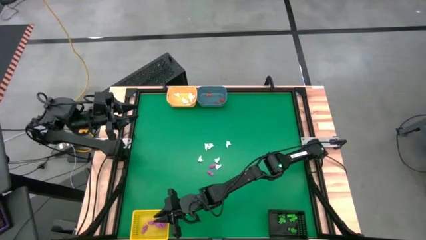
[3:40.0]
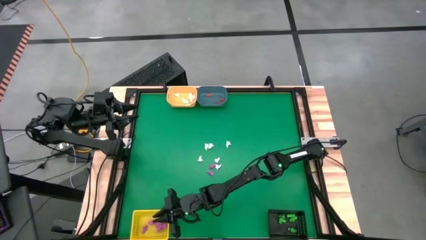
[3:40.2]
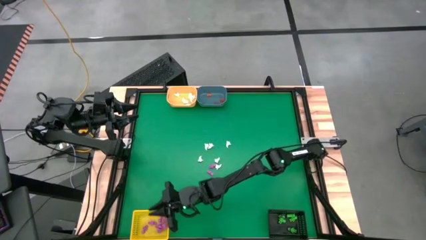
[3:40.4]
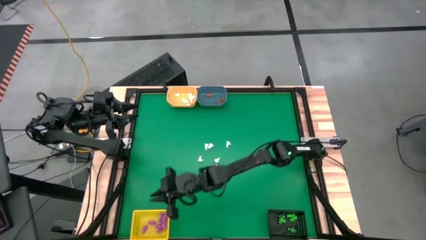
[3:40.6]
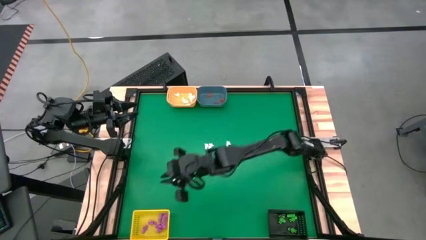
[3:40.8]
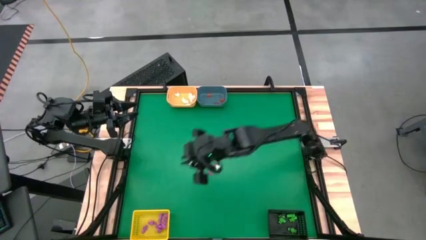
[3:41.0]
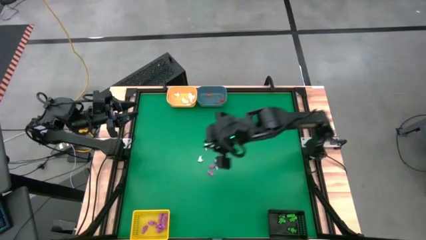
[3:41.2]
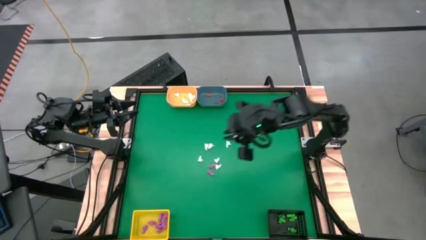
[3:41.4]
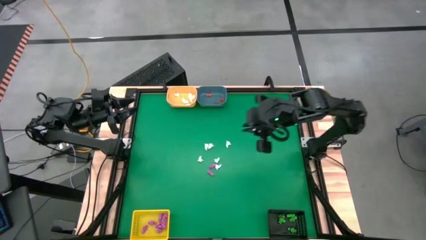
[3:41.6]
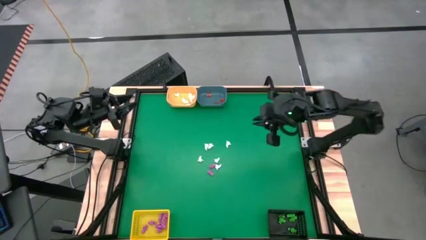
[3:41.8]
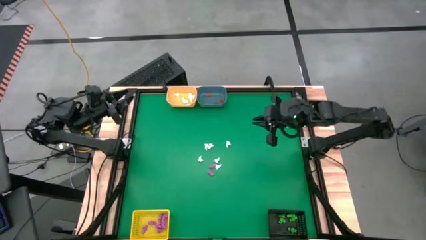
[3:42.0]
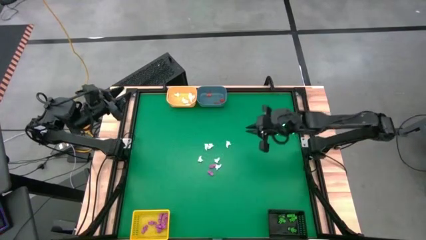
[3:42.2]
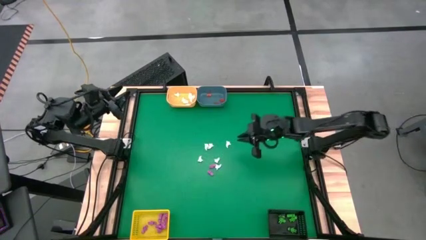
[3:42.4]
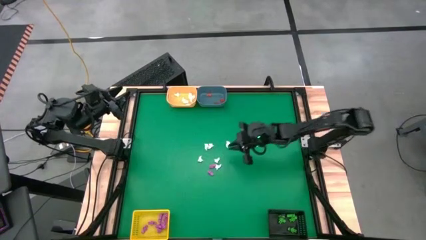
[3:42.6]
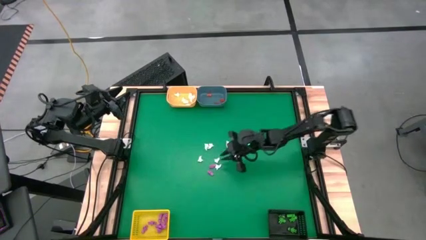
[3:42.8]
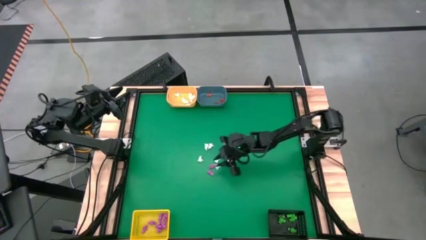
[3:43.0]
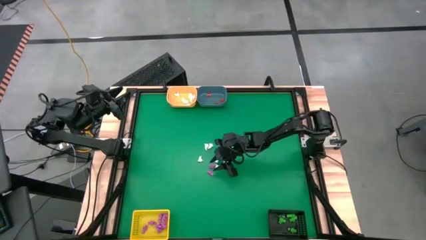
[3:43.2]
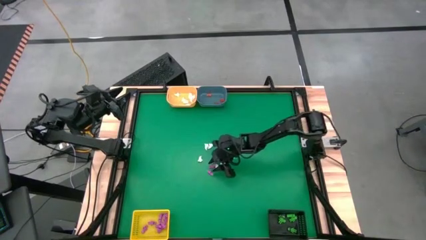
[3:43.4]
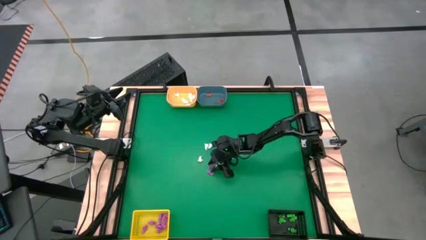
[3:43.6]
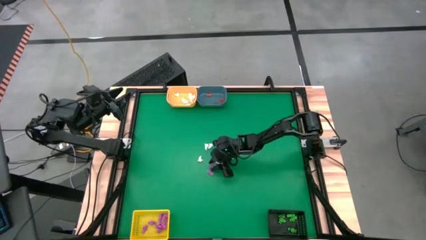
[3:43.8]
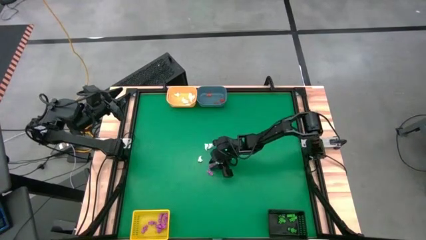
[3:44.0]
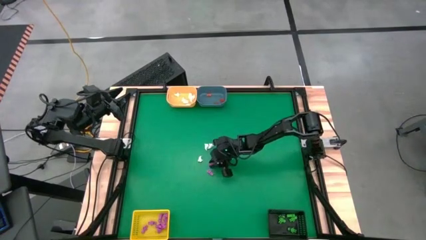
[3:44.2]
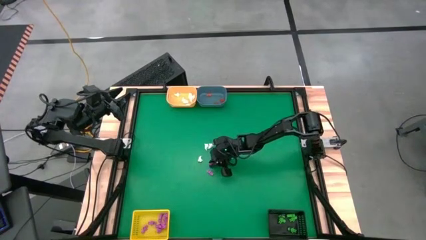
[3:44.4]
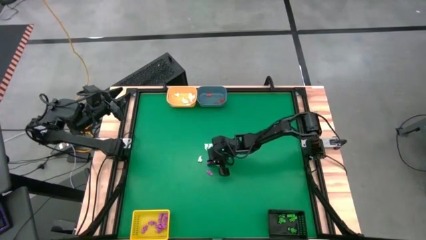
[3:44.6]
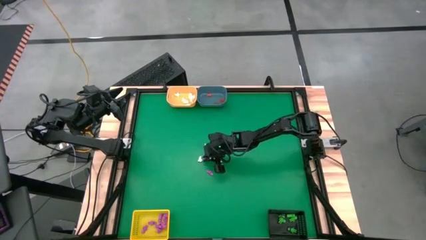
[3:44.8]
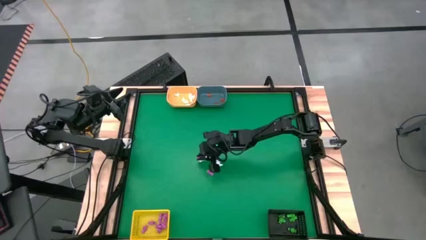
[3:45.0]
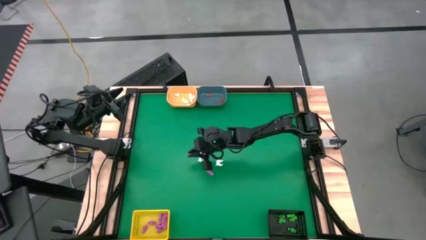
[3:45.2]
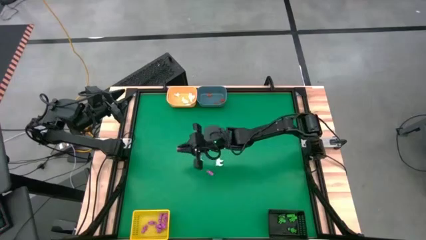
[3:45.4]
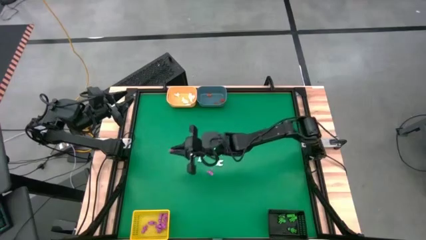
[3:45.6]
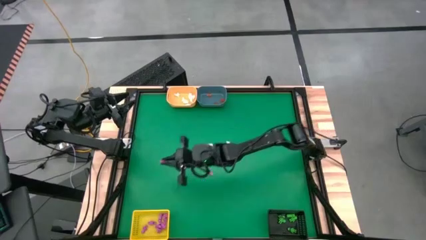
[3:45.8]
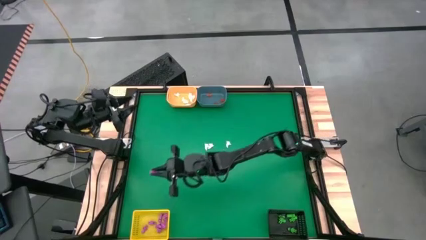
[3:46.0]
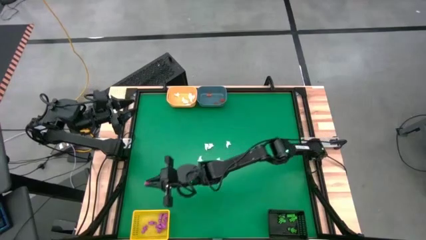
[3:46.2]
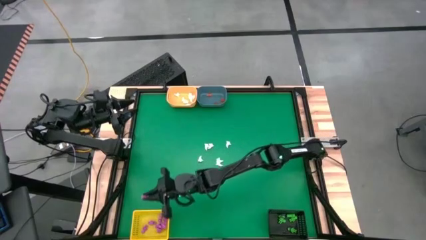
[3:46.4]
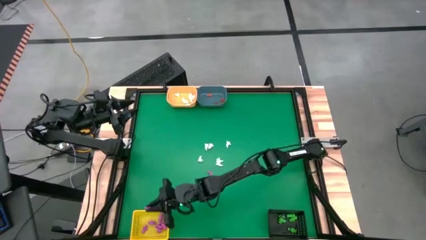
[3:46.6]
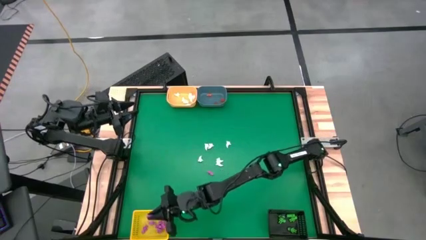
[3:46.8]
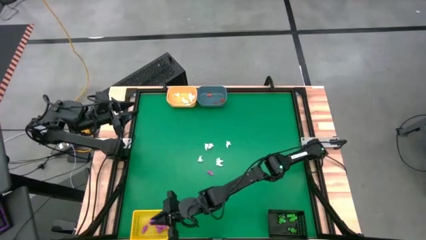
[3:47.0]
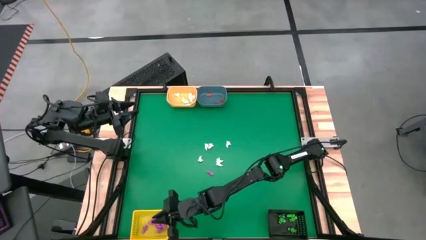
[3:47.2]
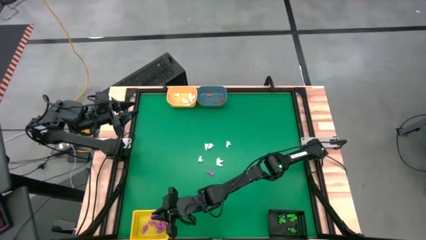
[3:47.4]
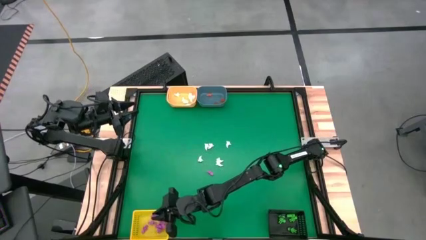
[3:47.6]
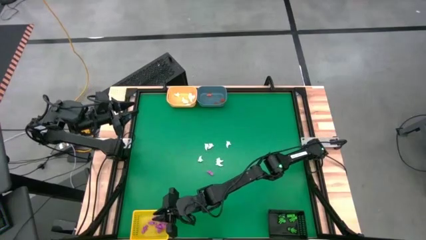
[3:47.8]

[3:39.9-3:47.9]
Task: Sort Halloween decoration
Put the pink skeleton into the yellow bin

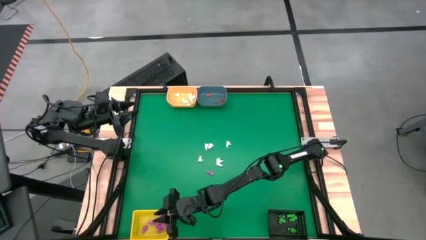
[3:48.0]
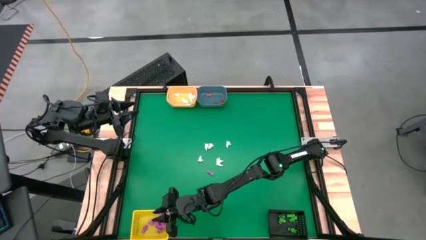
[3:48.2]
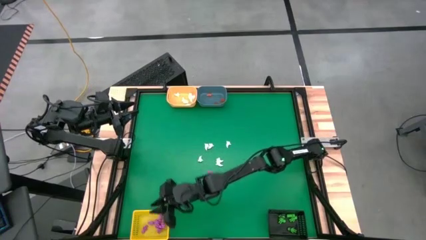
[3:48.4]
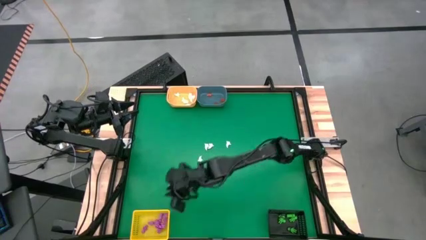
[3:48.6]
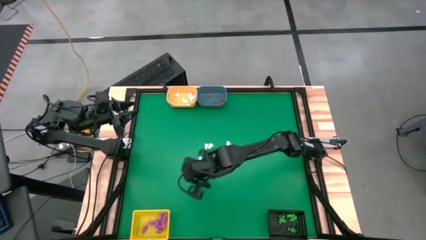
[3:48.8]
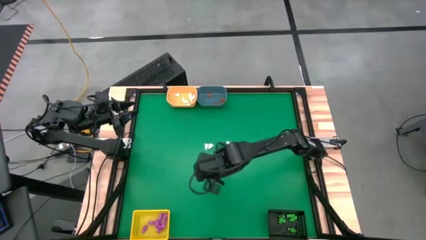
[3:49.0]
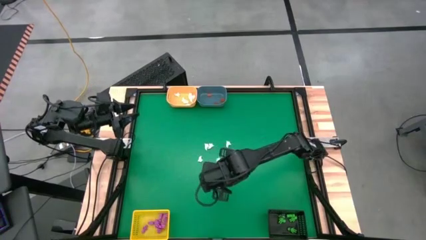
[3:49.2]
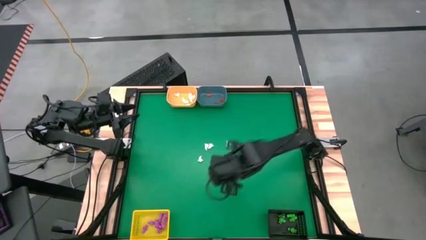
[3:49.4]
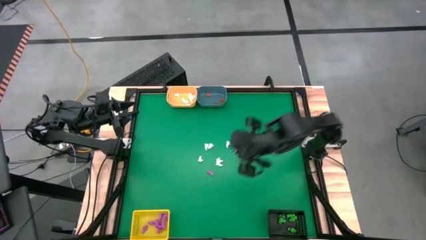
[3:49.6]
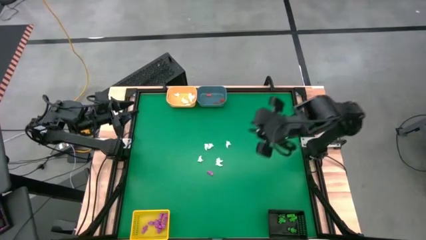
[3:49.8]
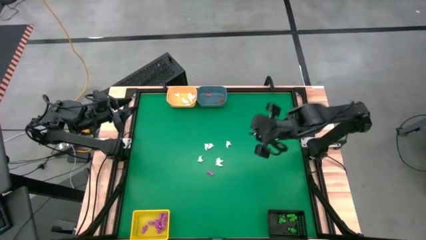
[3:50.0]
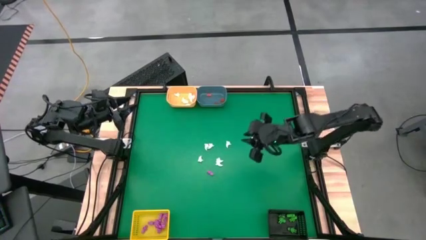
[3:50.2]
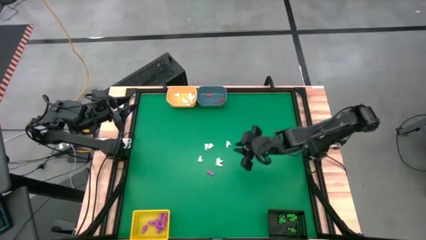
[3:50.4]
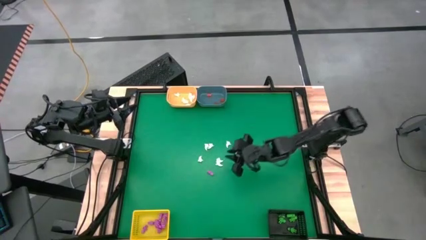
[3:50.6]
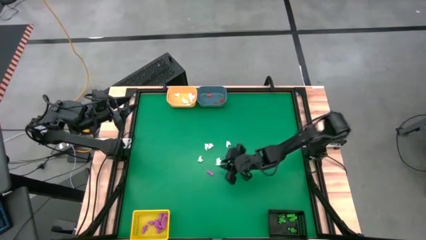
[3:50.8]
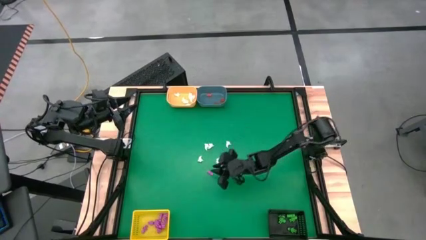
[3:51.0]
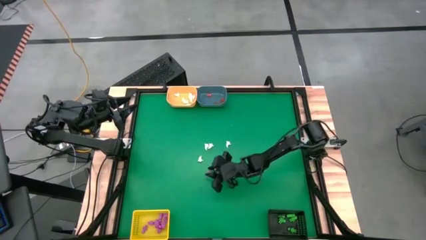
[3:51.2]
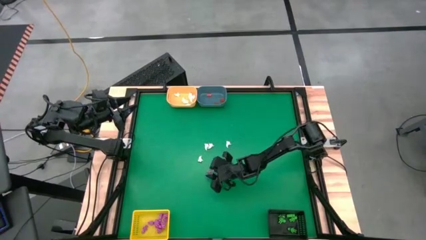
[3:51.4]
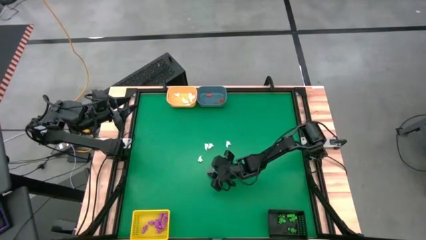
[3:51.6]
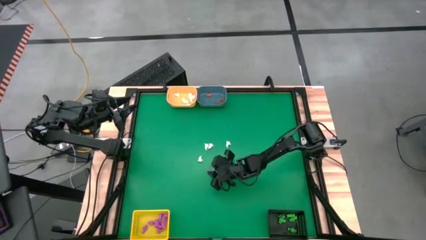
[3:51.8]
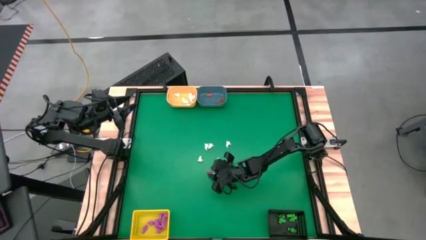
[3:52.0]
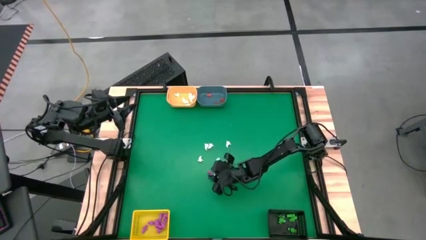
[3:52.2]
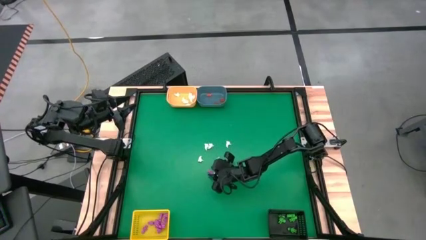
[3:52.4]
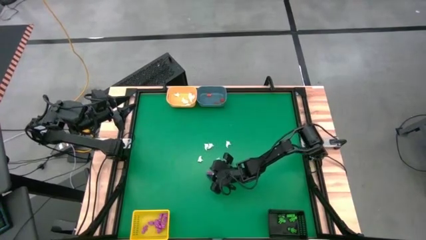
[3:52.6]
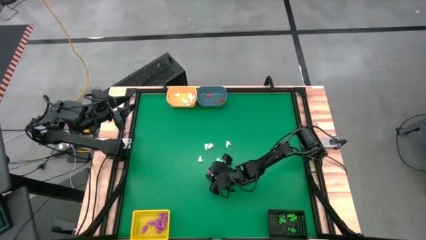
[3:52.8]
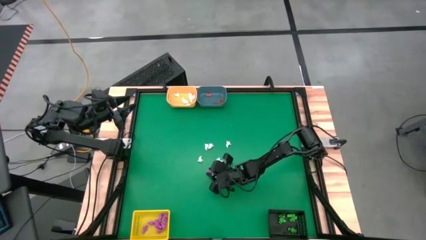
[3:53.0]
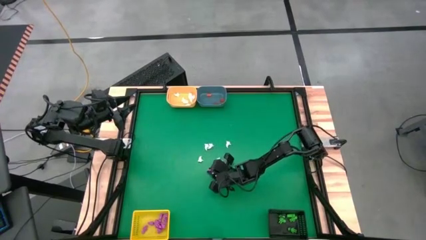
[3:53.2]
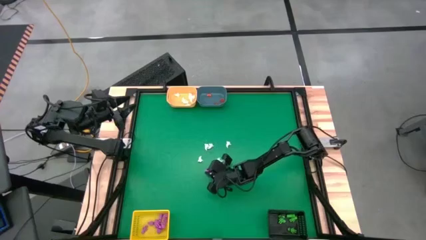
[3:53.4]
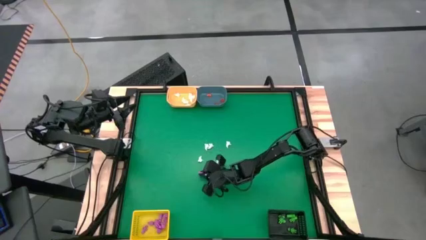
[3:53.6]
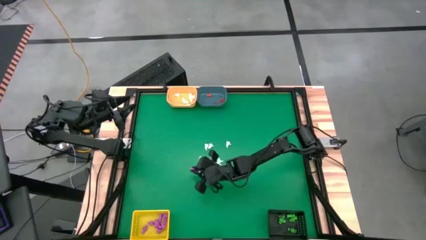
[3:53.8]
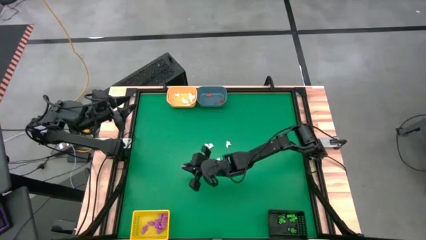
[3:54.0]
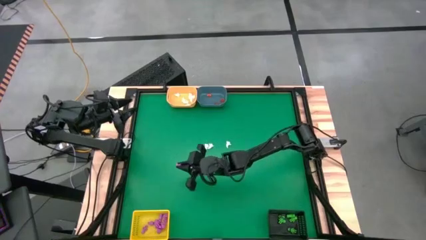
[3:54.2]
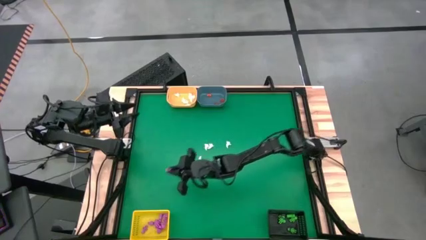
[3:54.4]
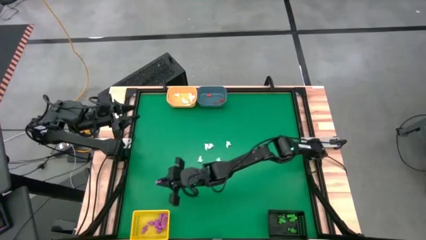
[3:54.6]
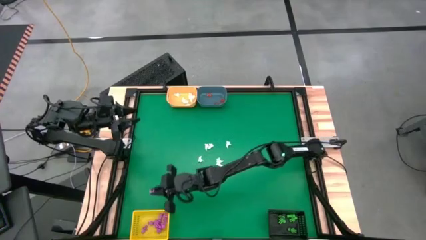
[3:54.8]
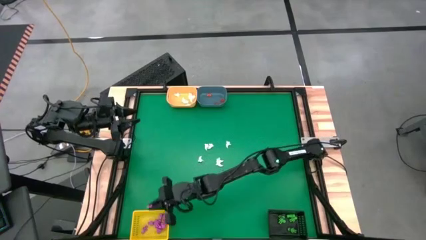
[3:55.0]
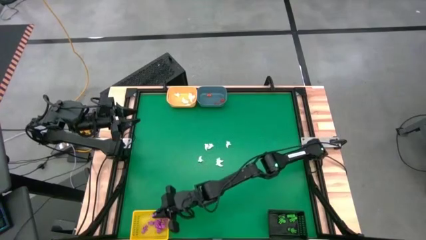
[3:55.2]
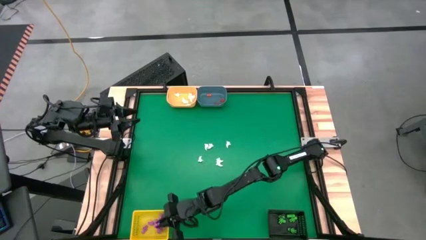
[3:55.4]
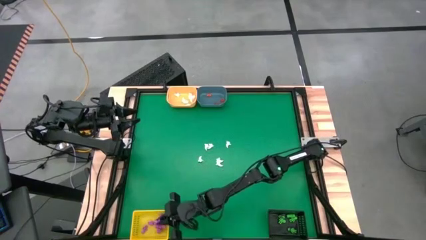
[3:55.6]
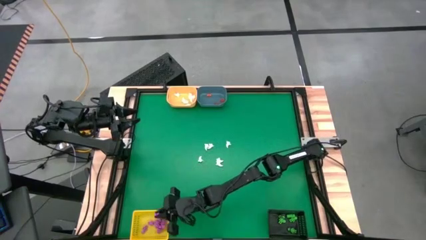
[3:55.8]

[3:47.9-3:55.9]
Put the pink skeleton into the yellow bin
